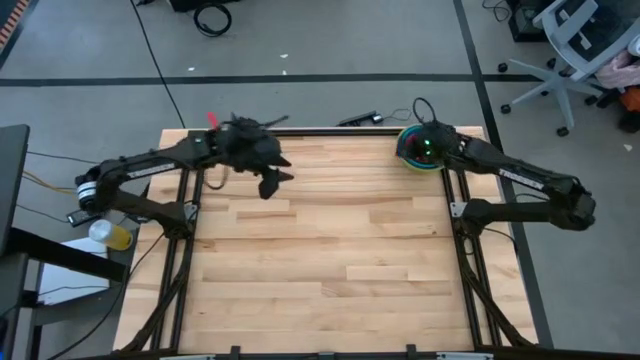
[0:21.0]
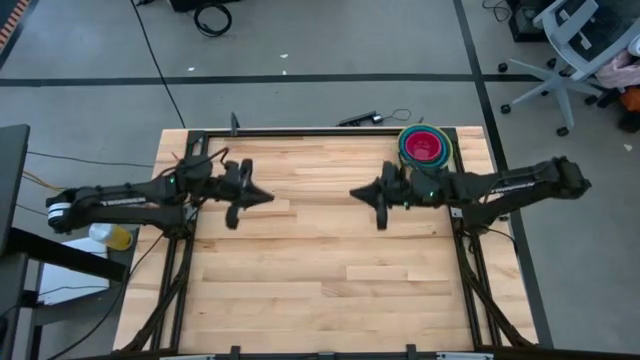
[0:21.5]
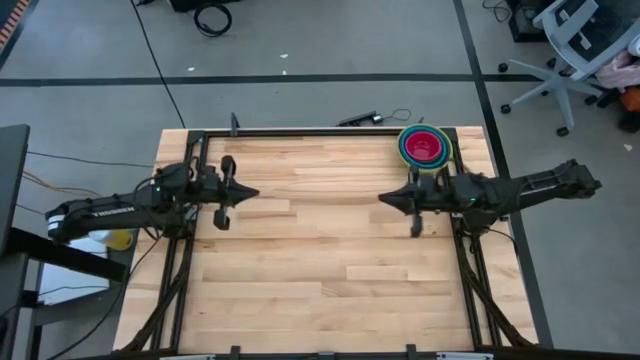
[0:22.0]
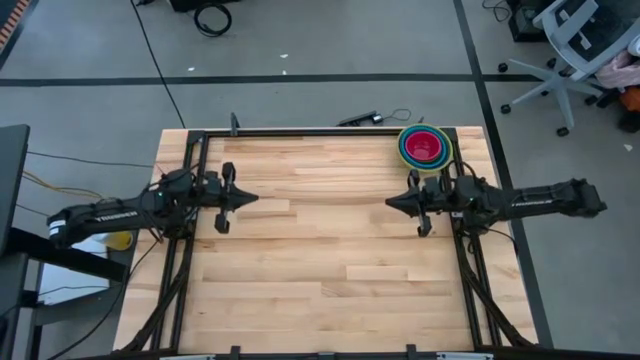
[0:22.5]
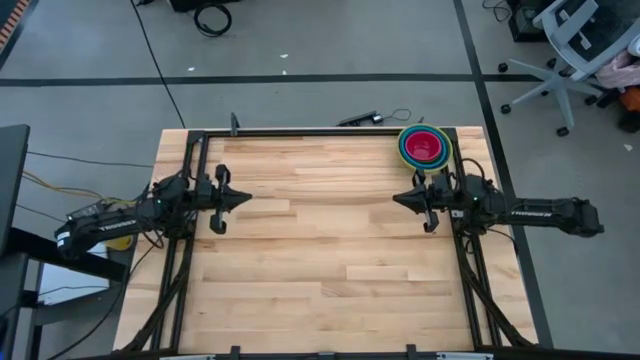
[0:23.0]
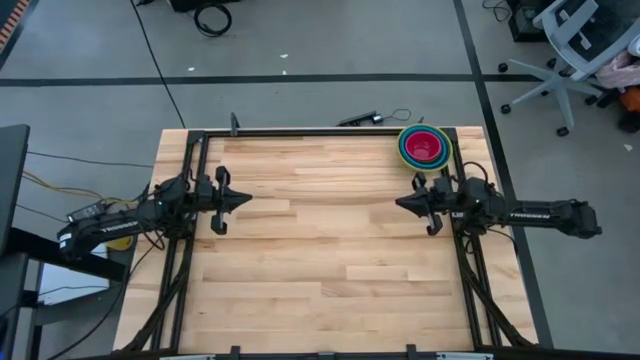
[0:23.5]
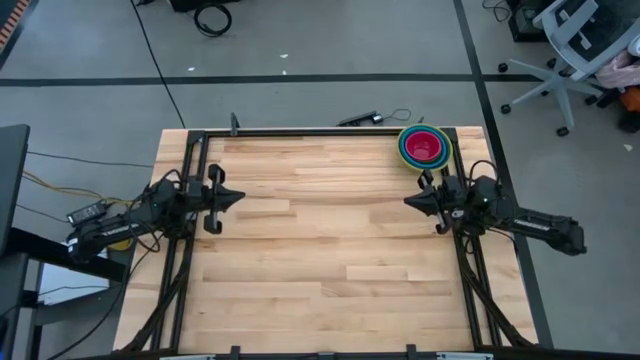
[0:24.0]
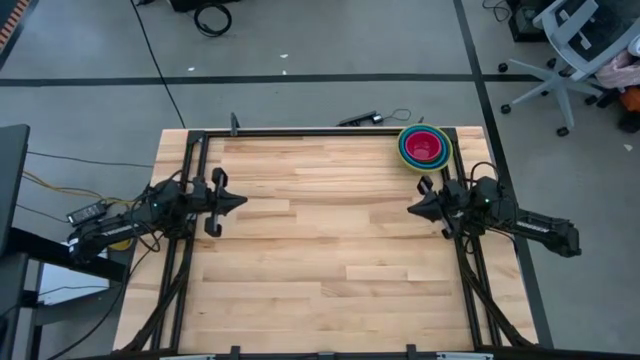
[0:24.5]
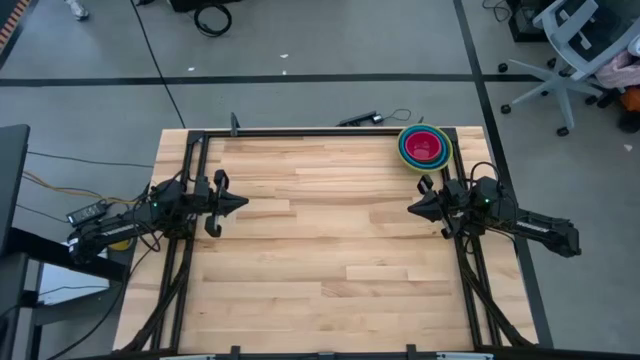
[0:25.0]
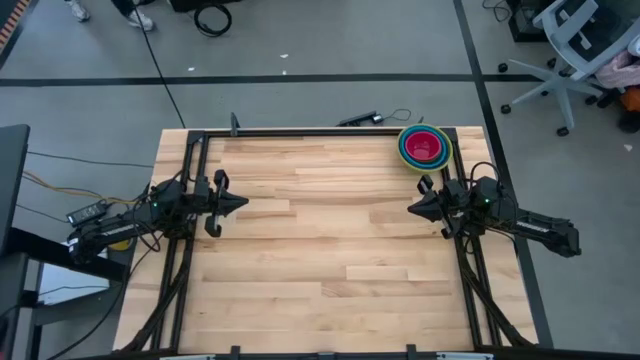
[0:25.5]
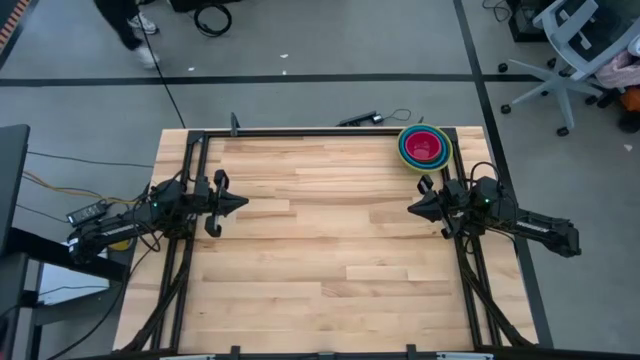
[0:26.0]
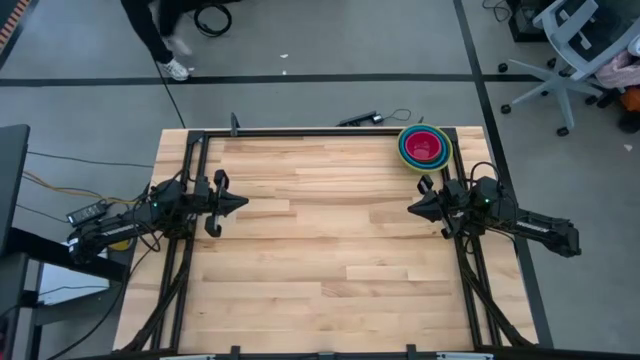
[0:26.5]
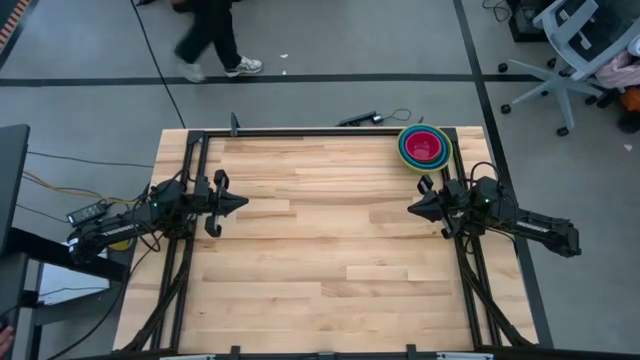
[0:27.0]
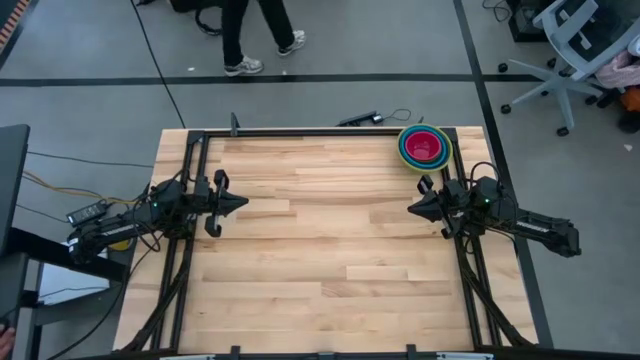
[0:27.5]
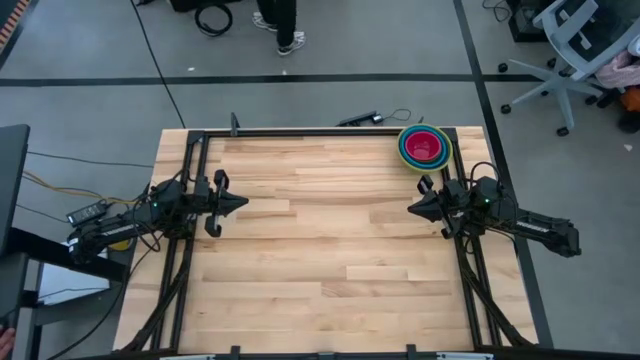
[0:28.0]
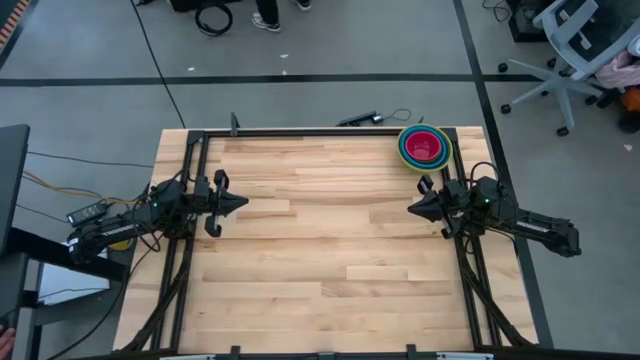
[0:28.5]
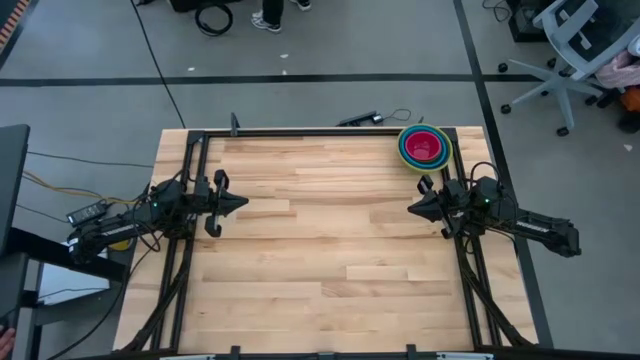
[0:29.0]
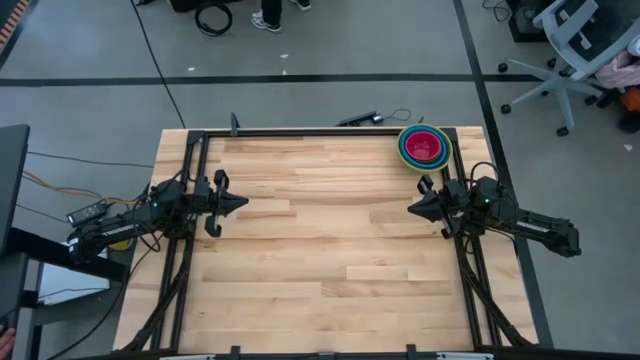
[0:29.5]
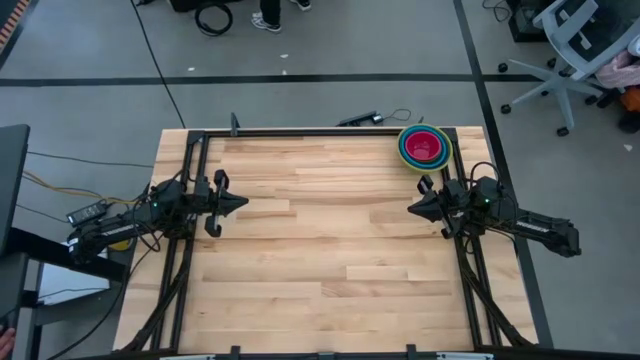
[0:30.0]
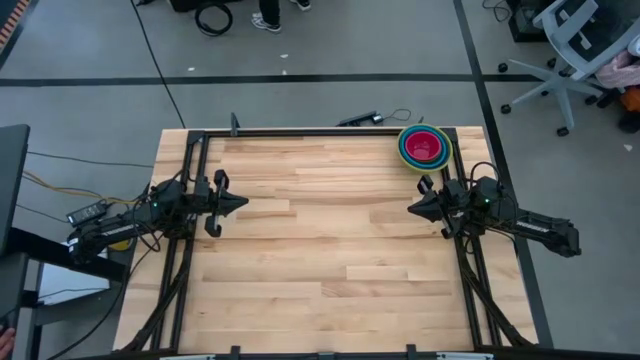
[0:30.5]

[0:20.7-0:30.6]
Return to Home Position

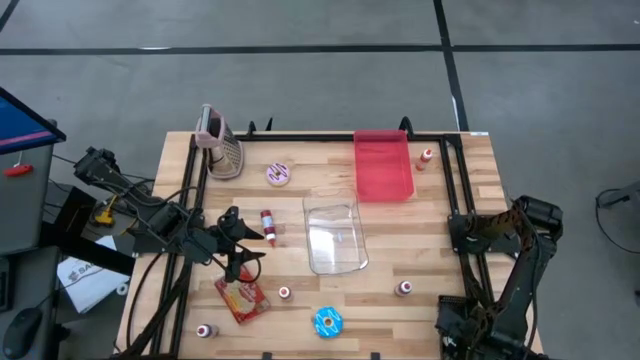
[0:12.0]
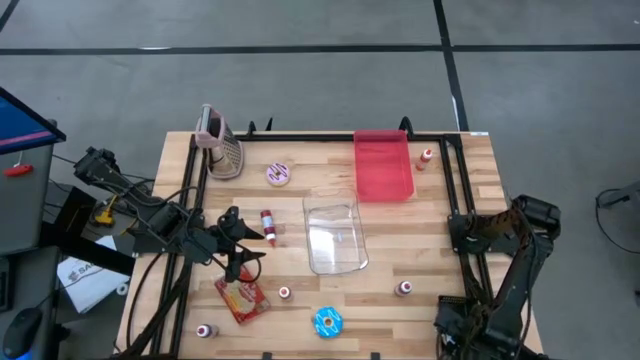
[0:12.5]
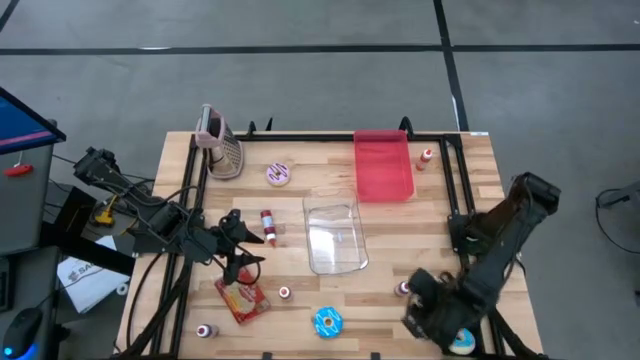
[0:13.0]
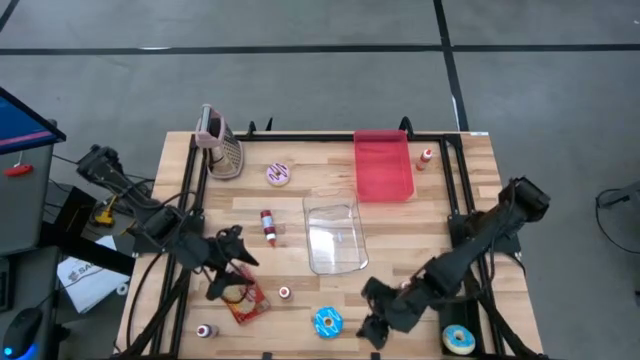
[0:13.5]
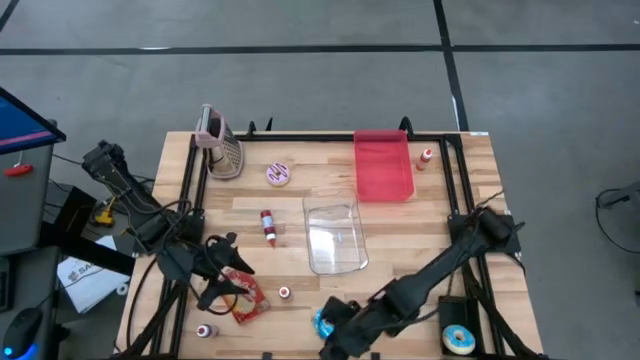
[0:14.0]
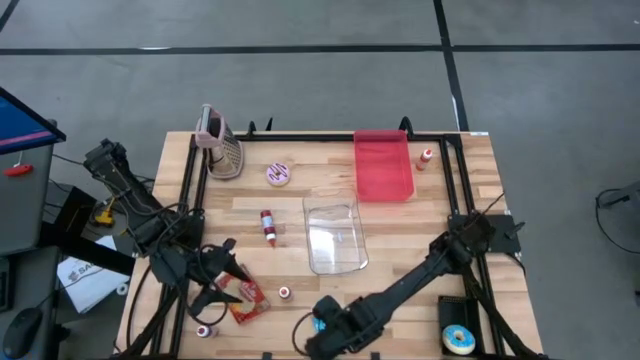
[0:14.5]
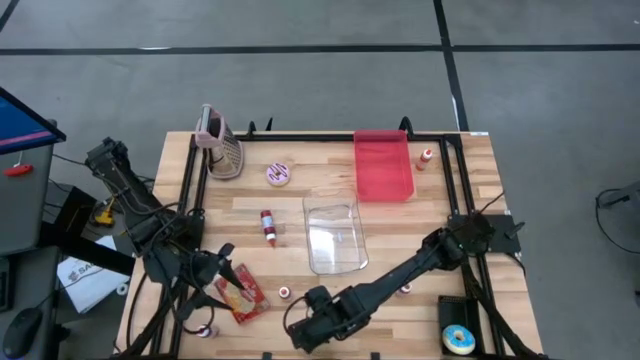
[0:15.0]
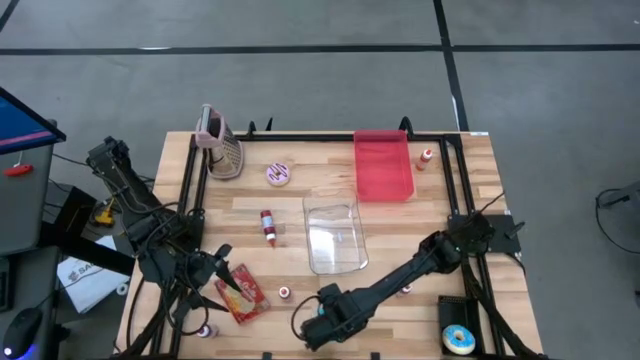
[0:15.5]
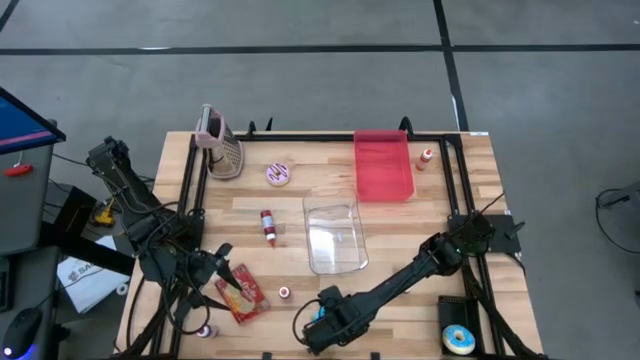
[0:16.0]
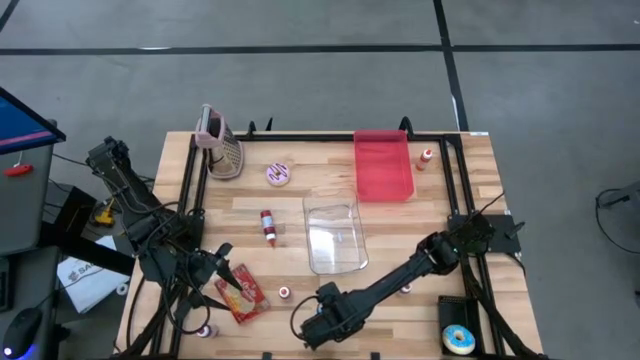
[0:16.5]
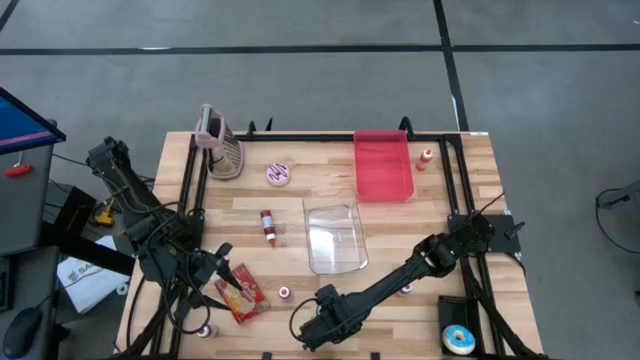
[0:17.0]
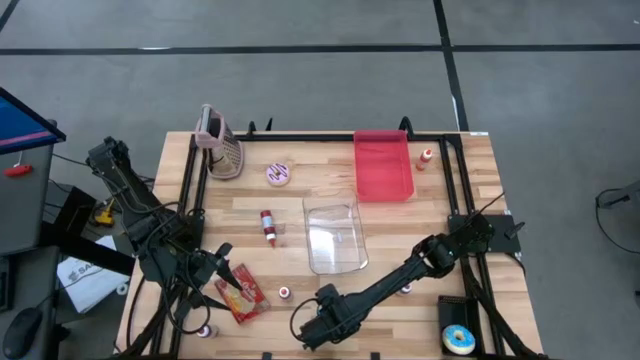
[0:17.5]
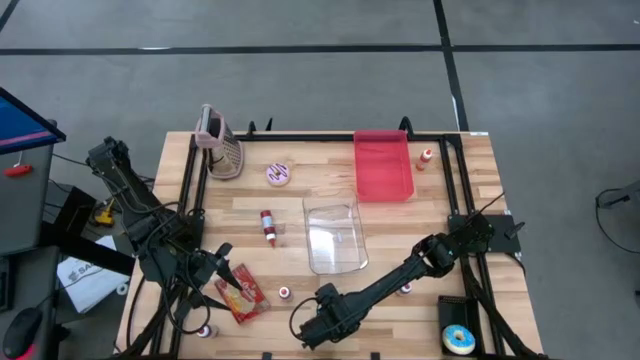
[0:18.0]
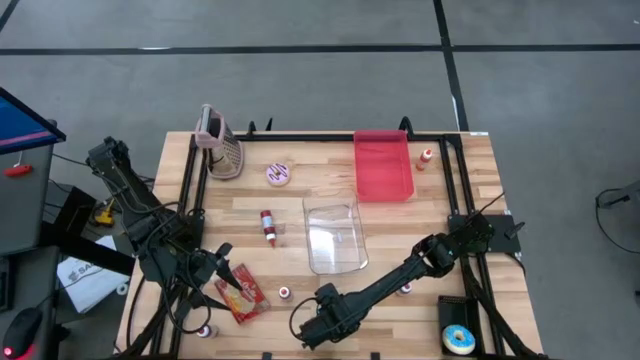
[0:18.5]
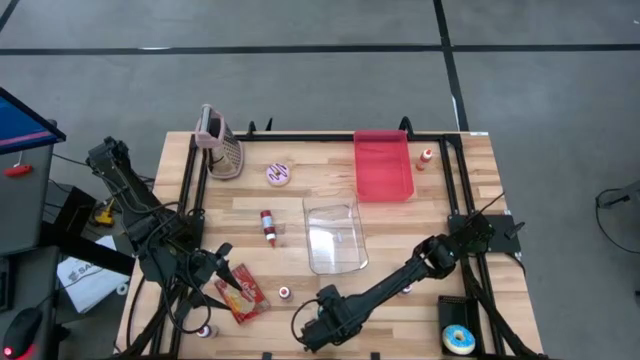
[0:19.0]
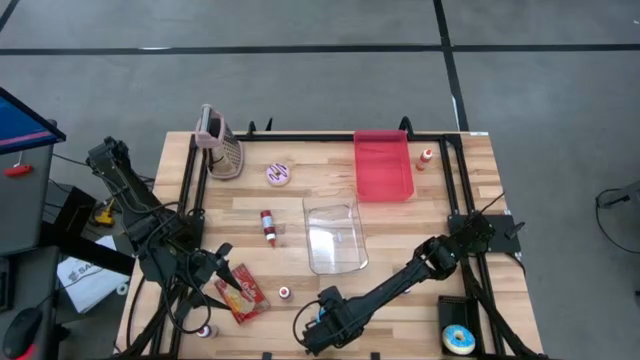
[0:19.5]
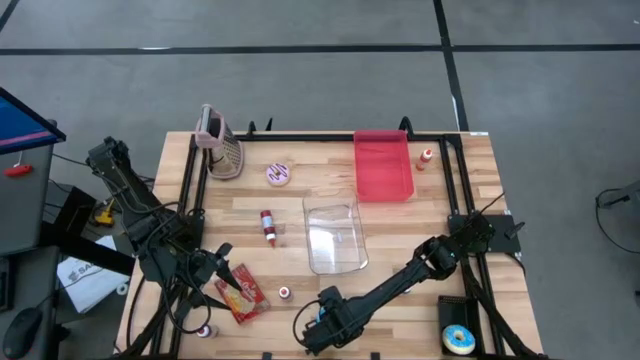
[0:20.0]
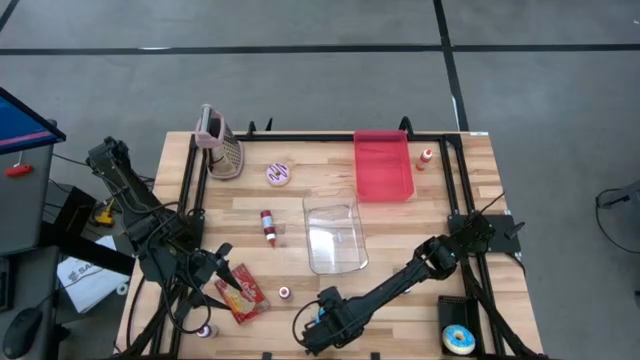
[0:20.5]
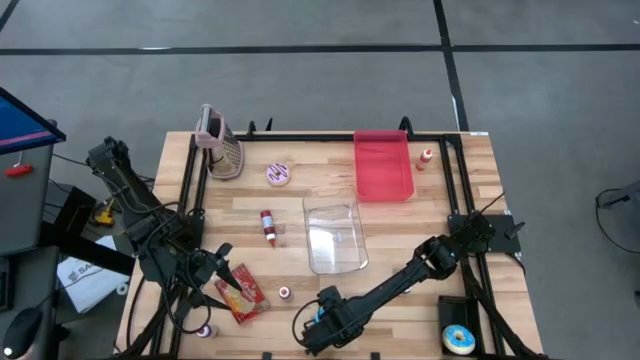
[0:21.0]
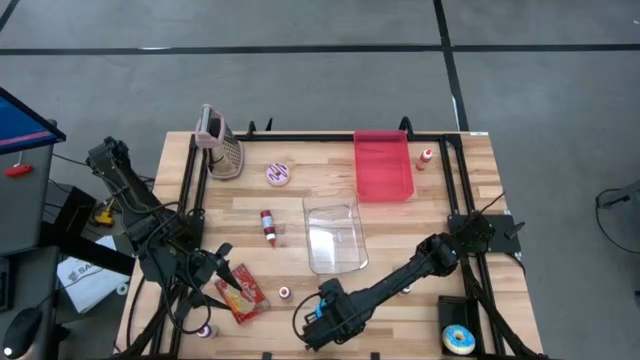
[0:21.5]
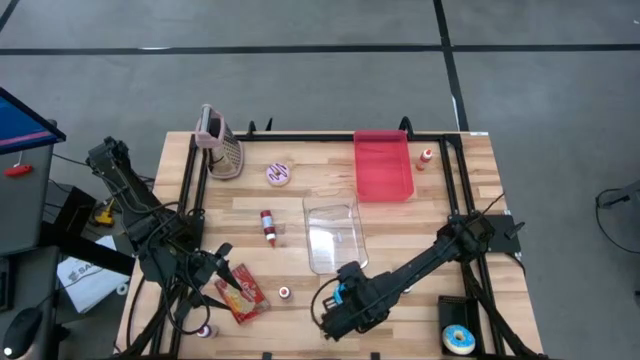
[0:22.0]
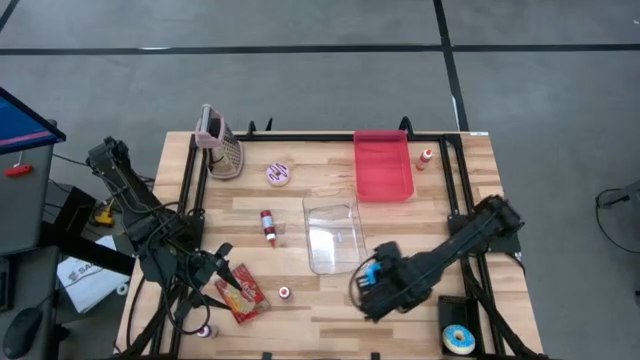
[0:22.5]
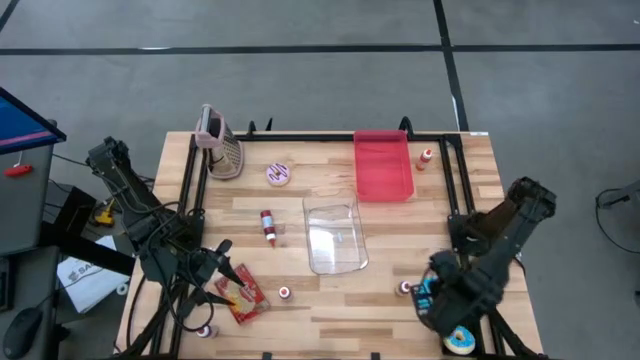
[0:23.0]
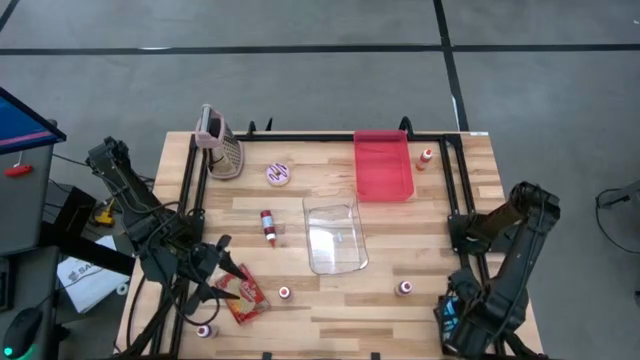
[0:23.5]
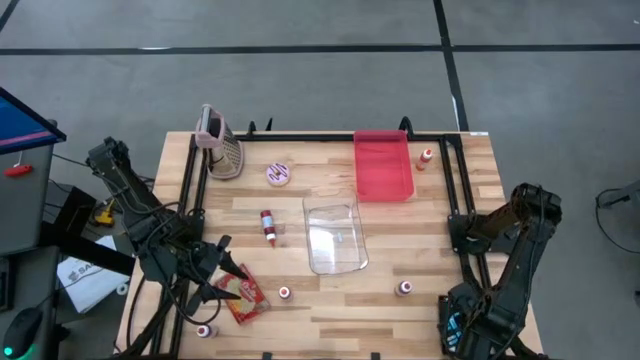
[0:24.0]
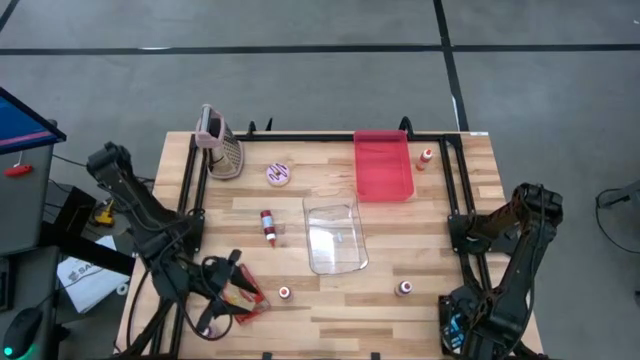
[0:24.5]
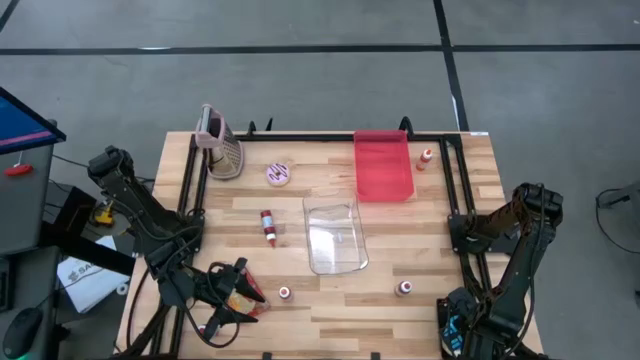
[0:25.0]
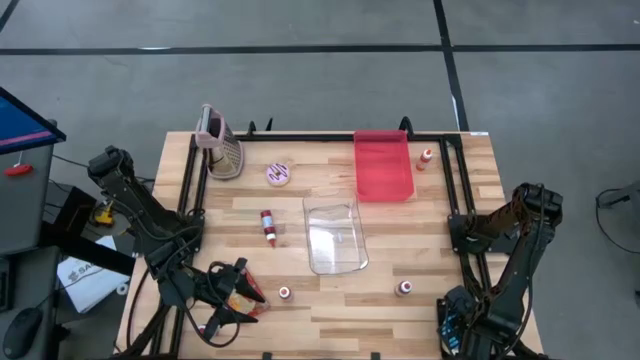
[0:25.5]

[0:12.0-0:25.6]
Put the blue donut into the black bin
